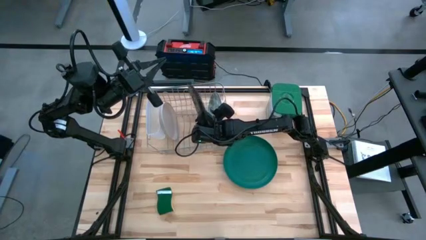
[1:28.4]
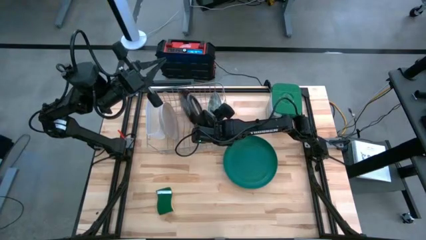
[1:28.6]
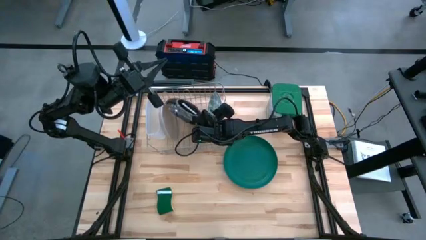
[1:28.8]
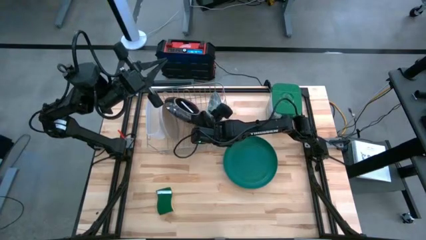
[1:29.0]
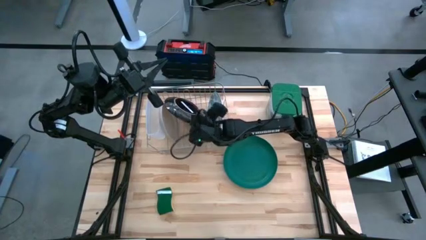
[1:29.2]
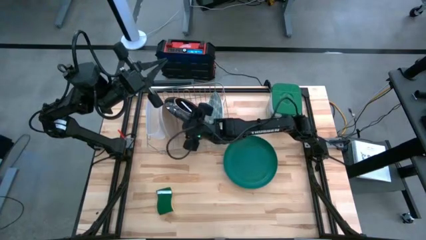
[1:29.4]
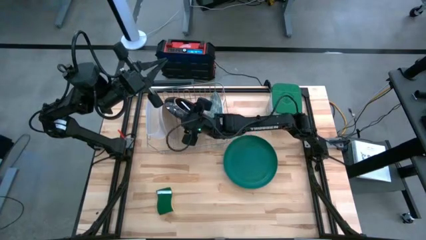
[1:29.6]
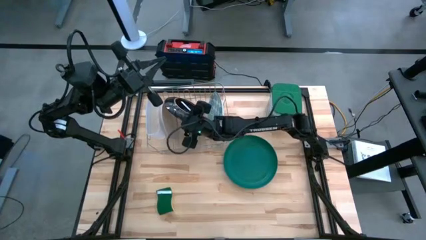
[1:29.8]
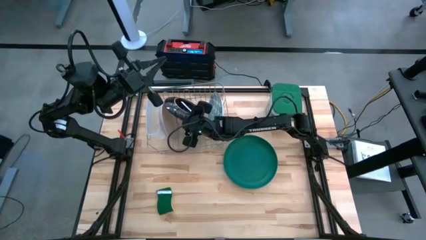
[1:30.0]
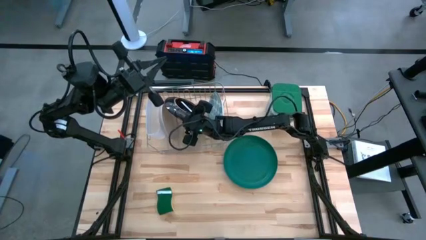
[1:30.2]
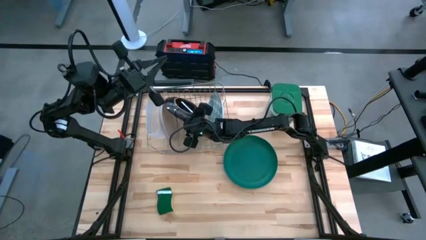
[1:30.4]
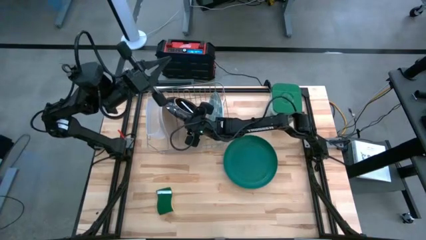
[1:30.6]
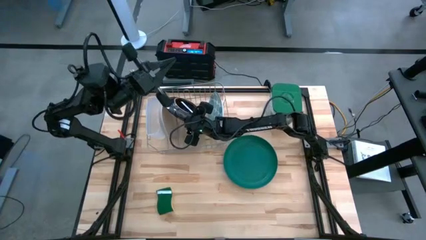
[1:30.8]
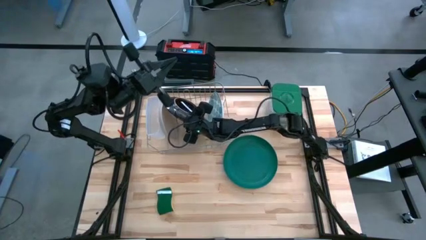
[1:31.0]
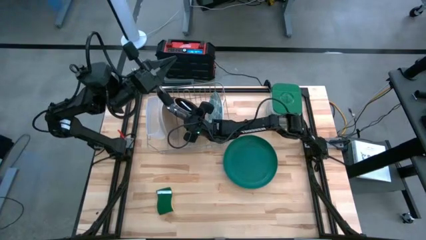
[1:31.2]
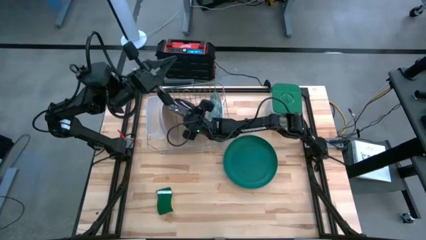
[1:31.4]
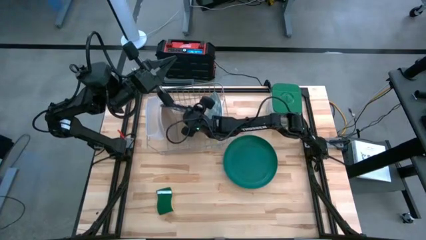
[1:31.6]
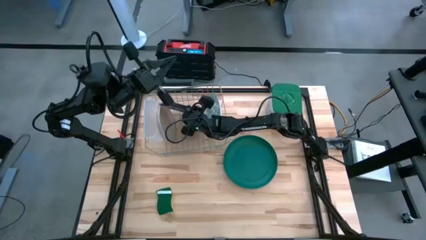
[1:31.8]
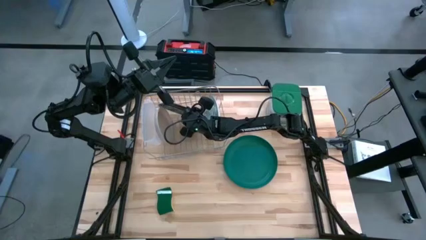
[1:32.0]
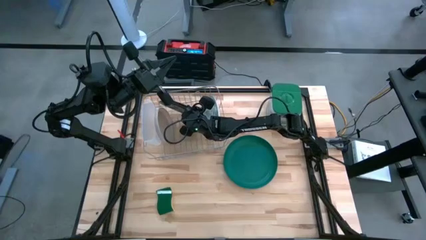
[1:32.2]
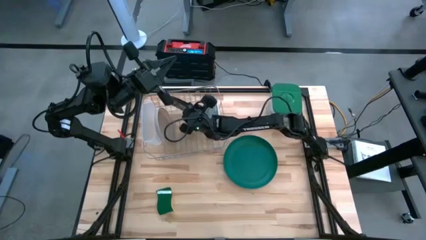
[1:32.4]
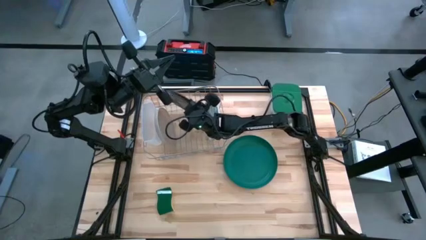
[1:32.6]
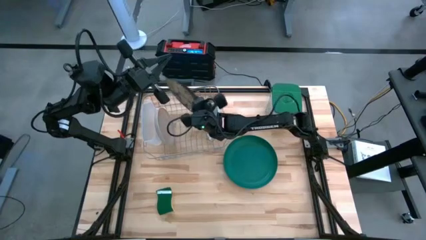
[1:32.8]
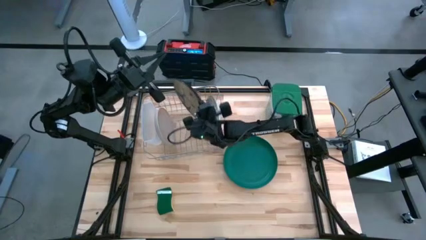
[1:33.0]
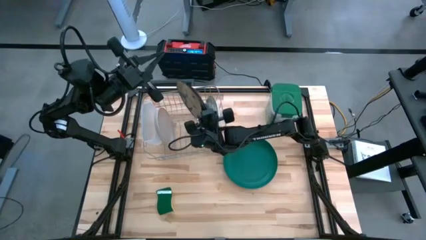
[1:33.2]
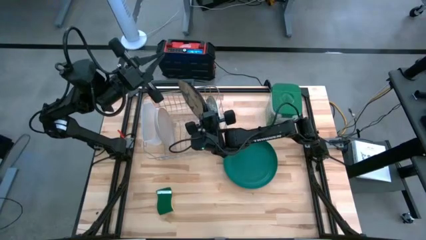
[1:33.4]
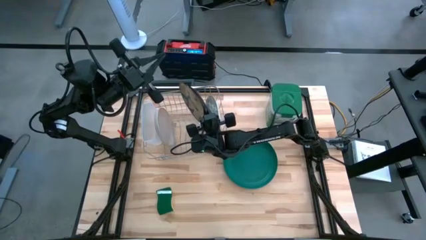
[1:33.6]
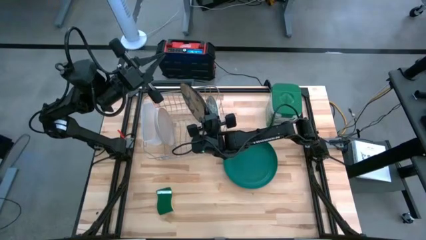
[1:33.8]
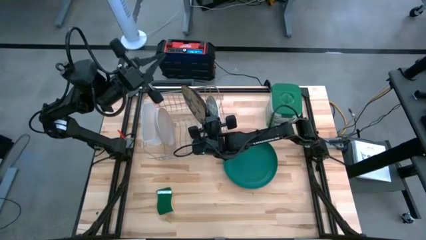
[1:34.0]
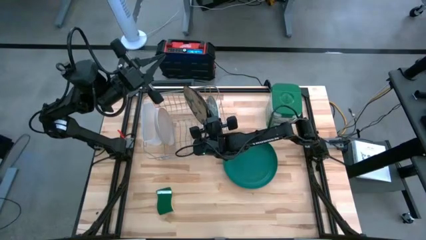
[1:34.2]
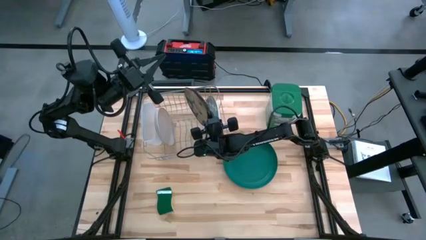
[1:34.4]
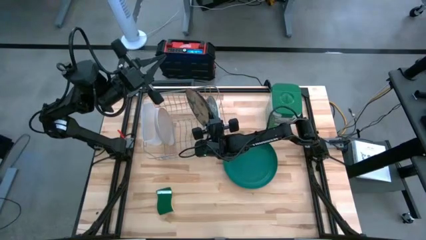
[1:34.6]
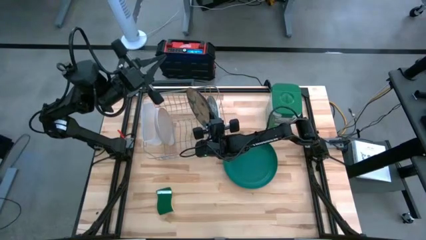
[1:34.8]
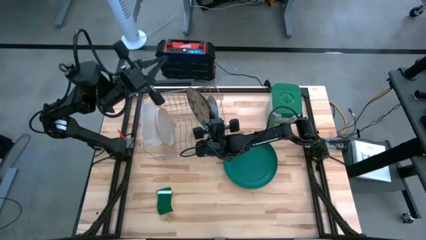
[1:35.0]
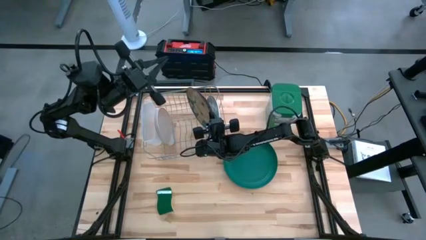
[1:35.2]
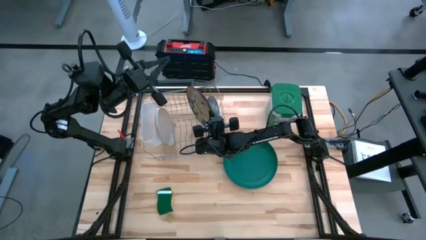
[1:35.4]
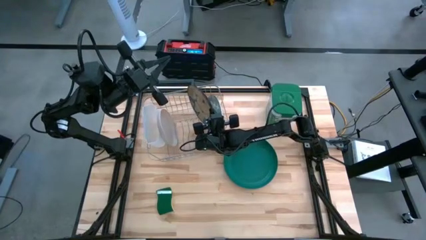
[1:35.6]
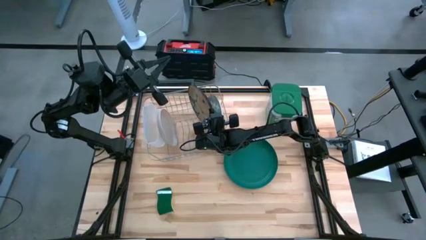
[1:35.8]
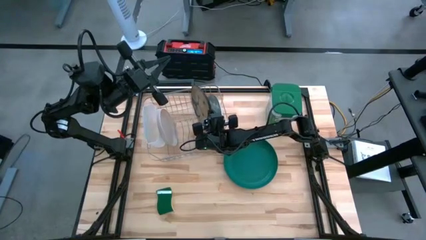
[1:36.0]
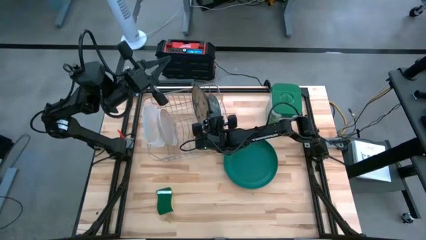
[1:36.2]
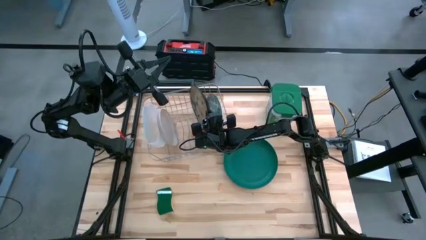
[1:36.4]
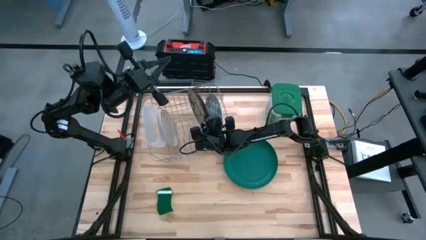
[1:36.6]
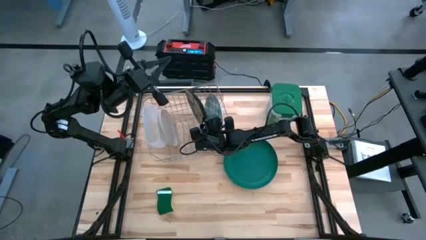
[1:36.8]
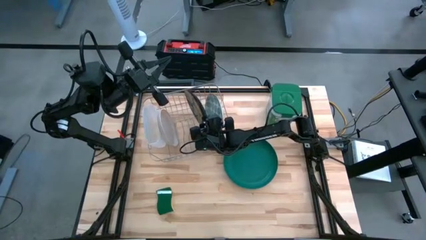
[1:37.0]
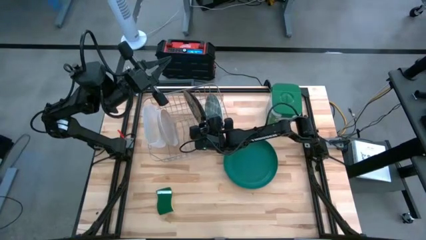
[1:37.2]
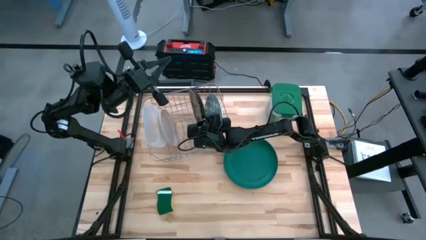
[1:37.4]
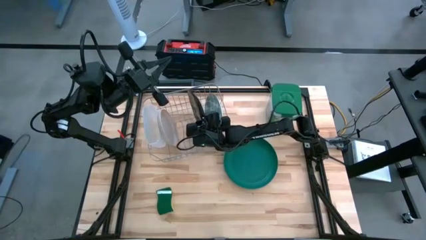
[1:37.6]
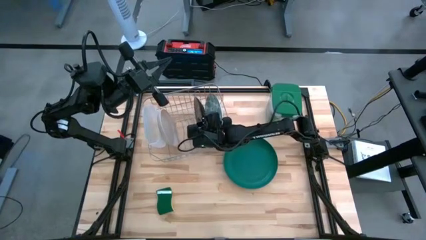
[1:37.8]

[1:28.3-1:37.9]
Task: Sort dishes
Put the white patterned plate on the dish rack

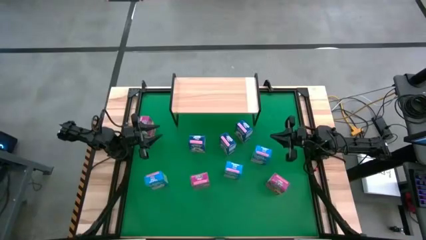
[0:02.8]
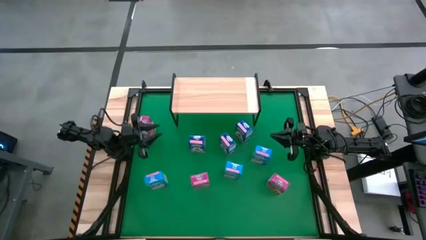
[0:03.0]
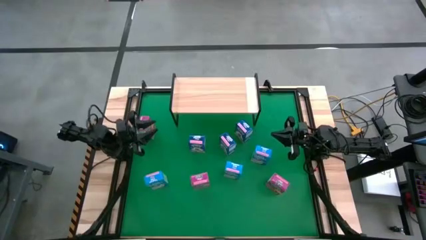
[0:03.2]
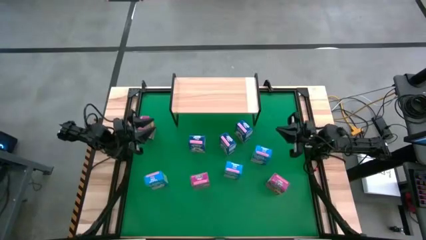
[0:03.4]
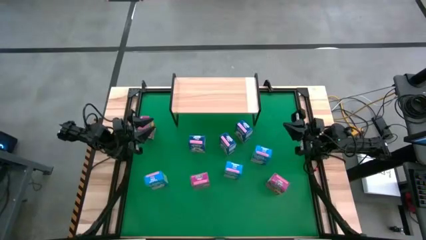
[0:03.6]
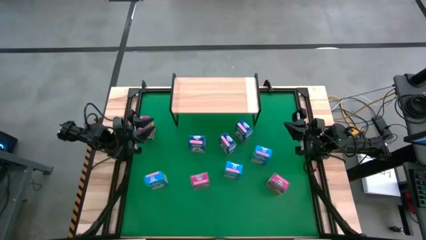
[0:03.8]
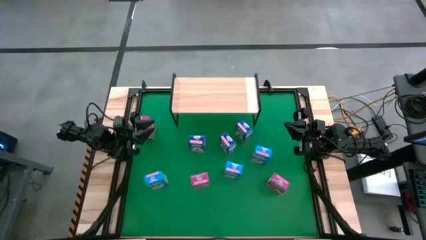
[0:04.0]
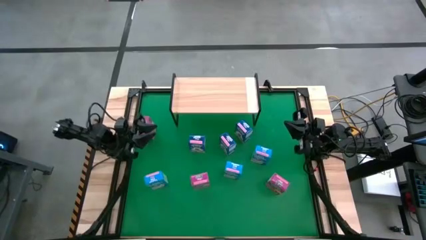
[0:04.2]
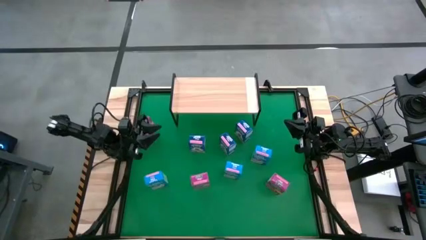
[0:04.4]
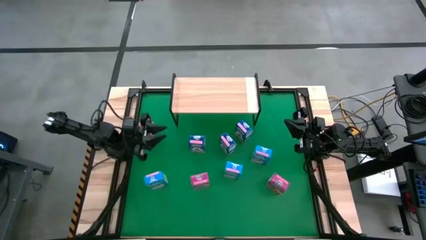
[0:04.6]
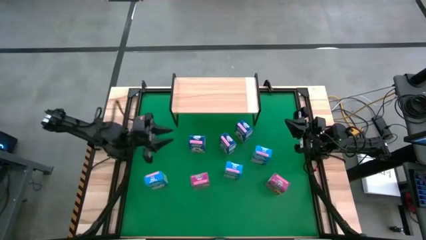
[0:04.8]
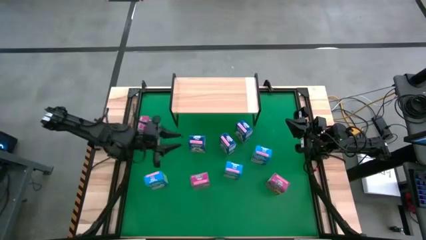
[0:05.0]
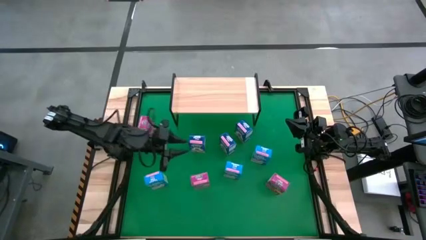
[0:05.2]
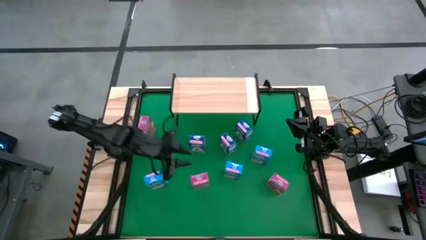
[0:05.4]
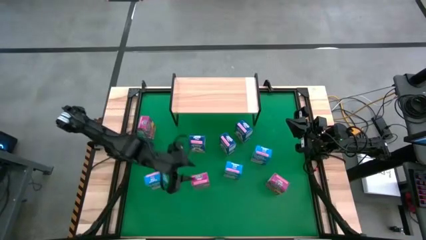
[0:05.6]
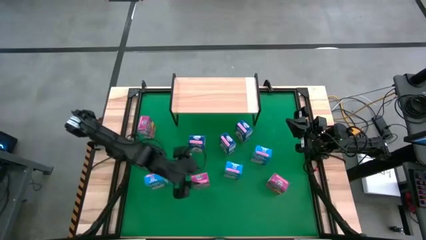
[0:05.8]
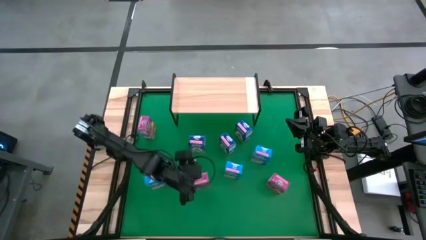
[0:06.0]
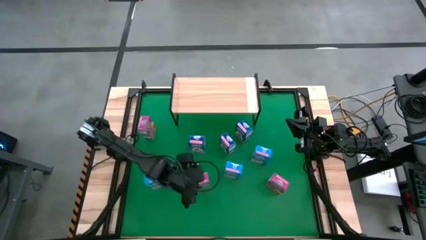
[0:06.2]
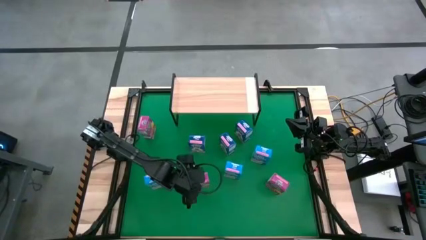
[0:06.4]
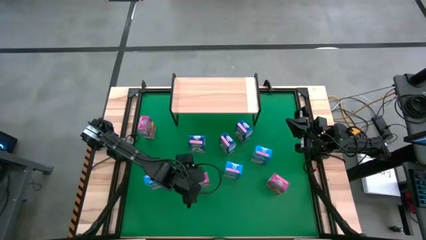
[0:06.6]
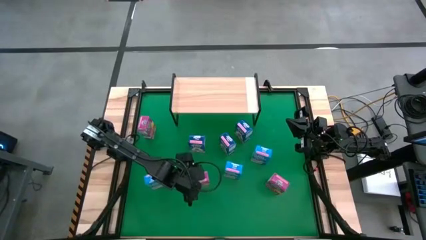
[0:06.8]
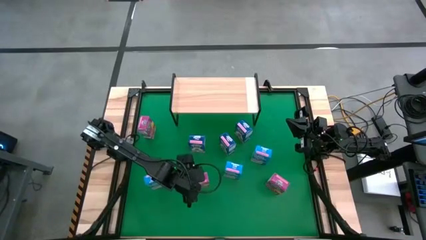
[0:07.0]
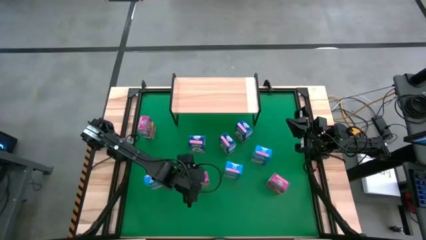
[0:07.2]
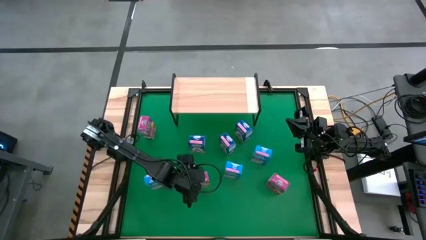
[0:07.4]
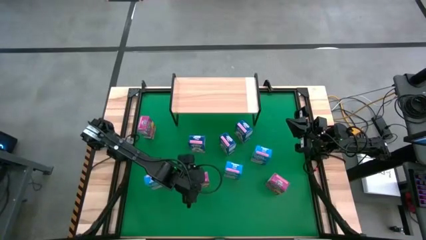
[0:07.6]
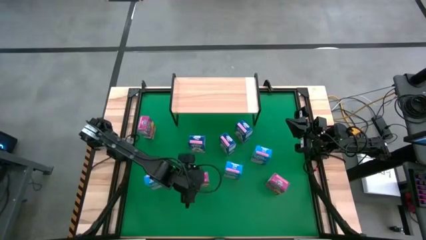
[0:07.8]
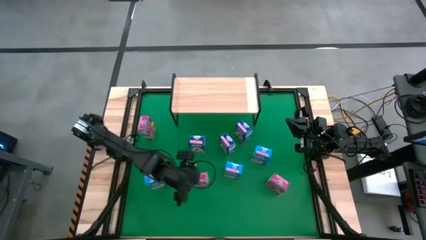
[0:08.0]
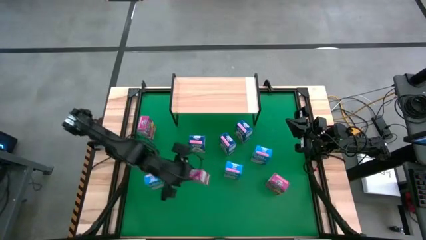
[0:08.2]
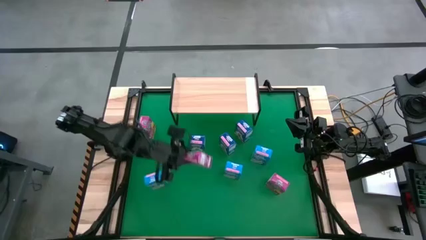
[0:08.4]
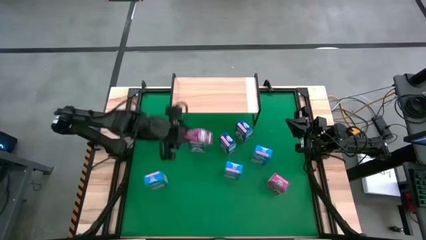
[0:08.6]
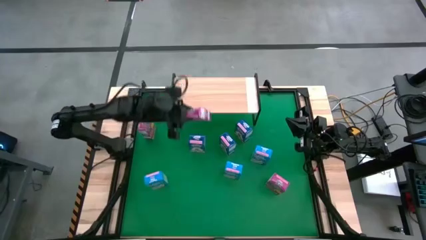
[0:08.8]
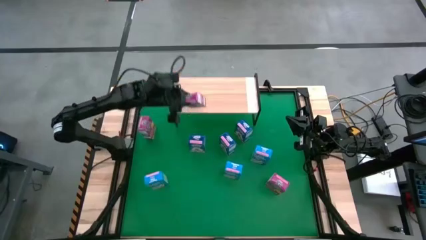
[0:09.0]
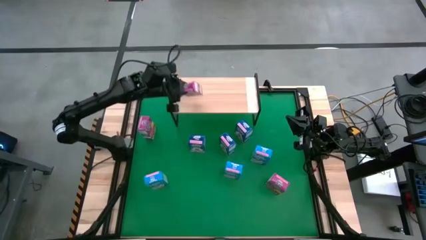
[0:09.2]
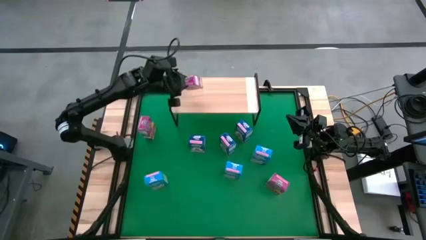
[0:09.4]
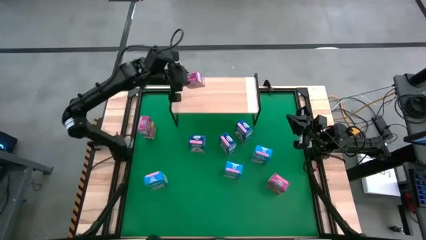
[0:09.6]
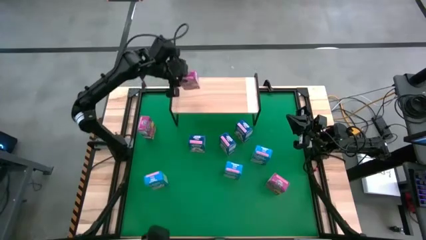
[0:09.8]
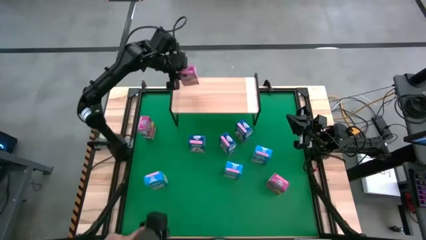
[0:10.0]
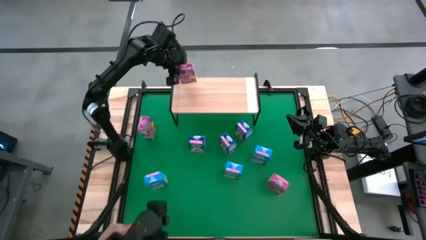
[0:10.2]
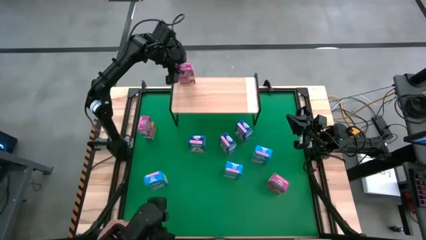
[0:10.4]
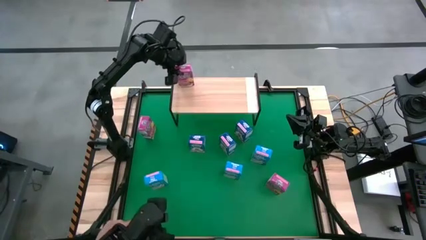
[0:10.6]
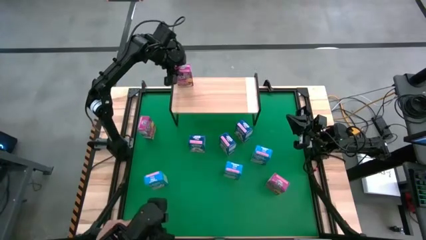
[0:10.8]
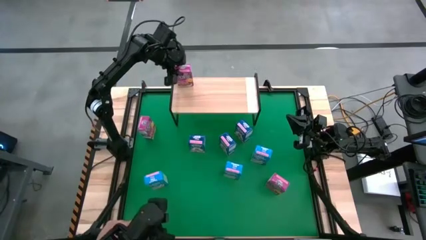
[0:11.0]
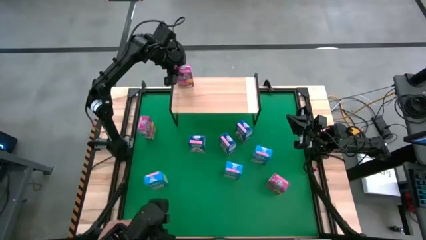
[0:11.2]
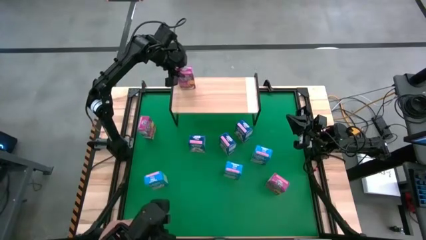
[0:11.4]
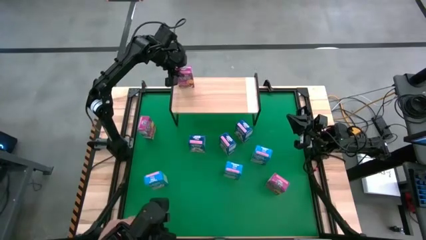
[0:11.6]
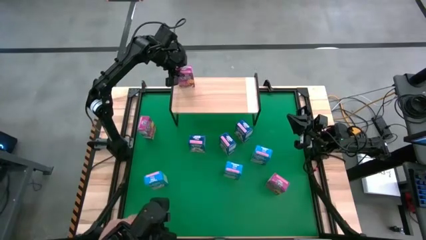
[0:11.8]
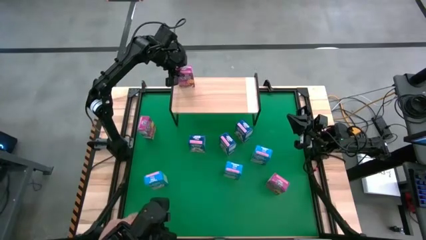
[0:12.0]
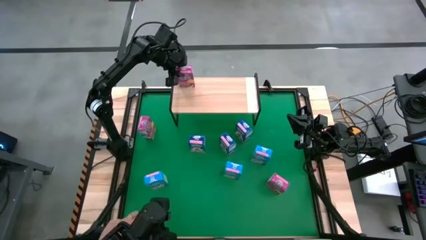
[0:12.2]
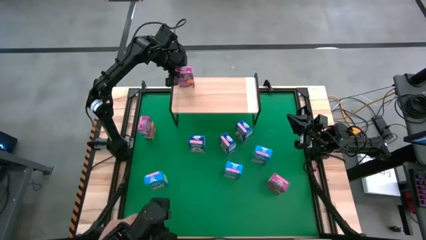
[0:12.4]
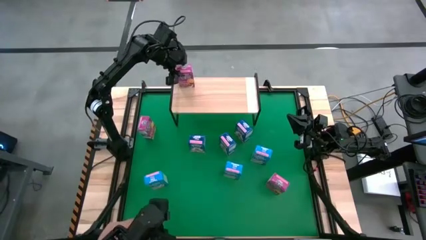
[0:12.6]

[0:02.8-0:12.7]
Task: Stack cereal on shelf
Put the bottom violet cereal box on the shelf
